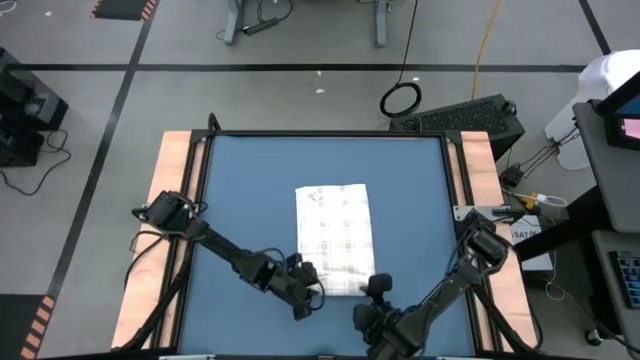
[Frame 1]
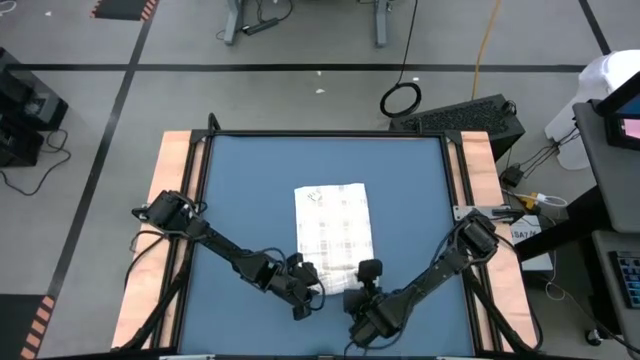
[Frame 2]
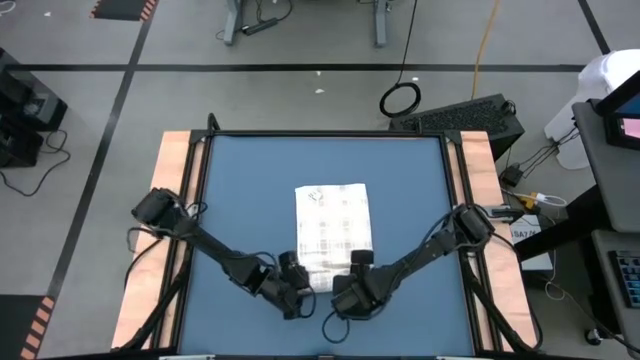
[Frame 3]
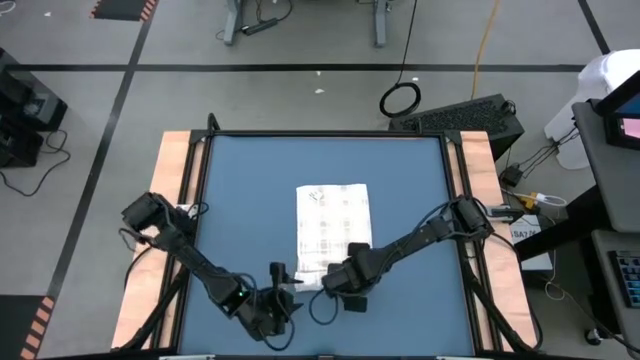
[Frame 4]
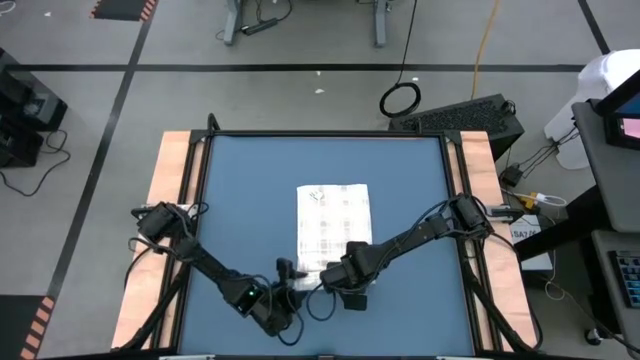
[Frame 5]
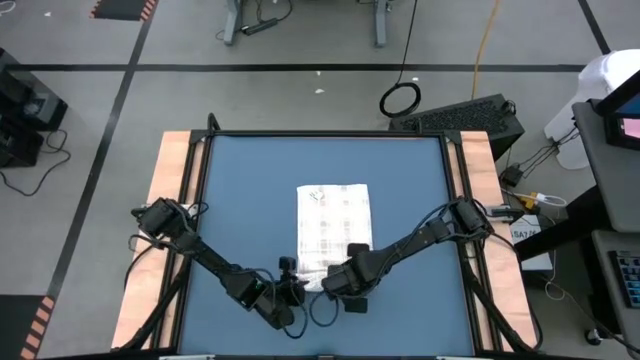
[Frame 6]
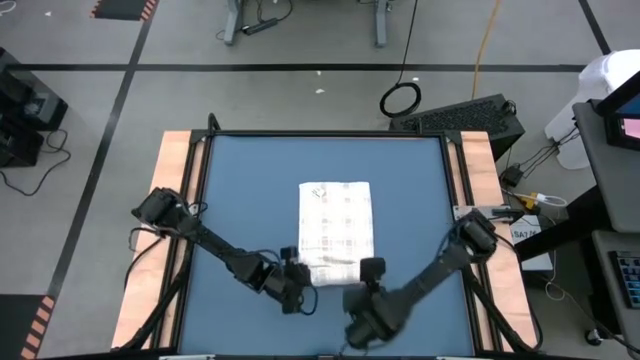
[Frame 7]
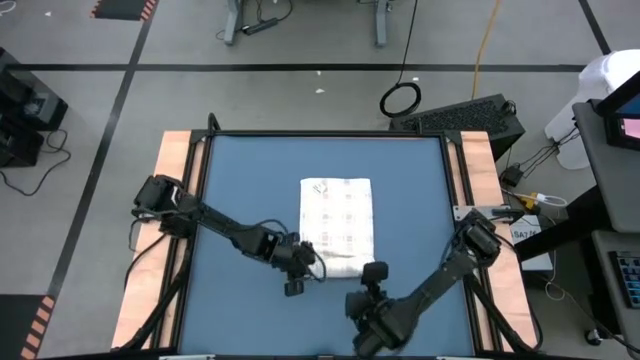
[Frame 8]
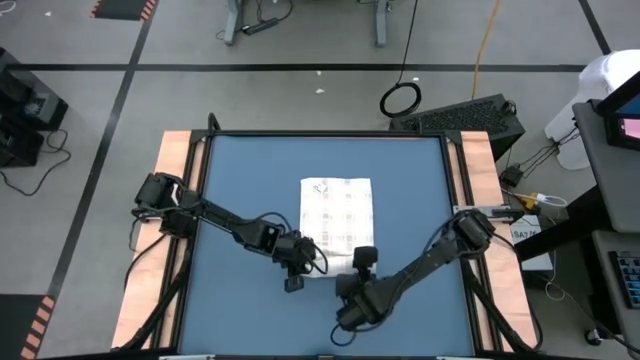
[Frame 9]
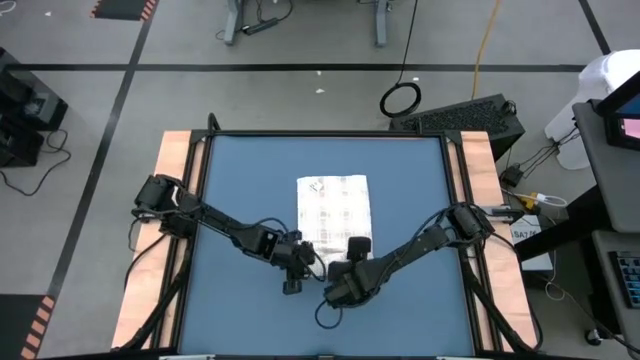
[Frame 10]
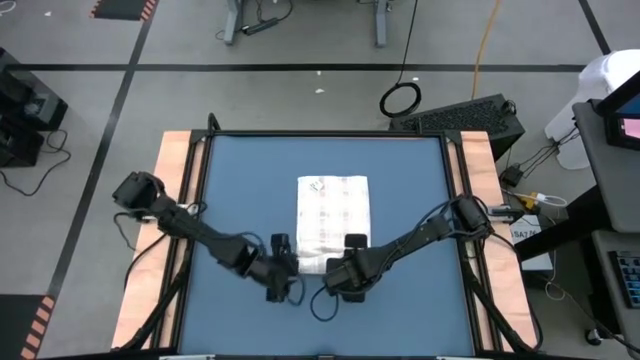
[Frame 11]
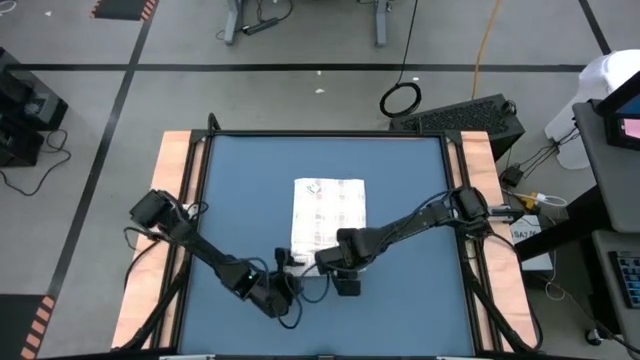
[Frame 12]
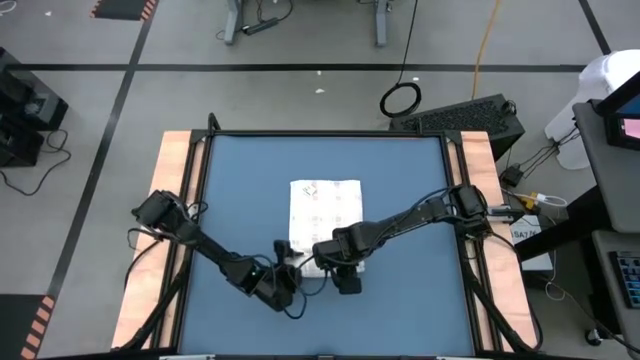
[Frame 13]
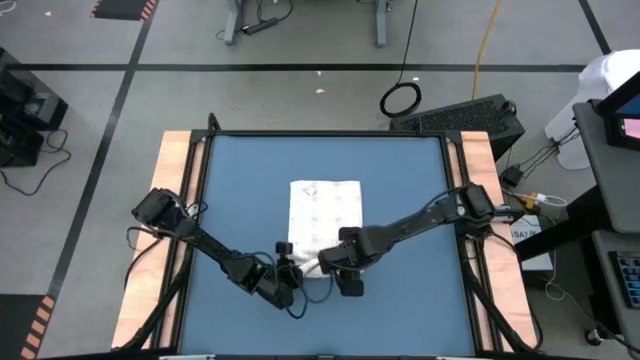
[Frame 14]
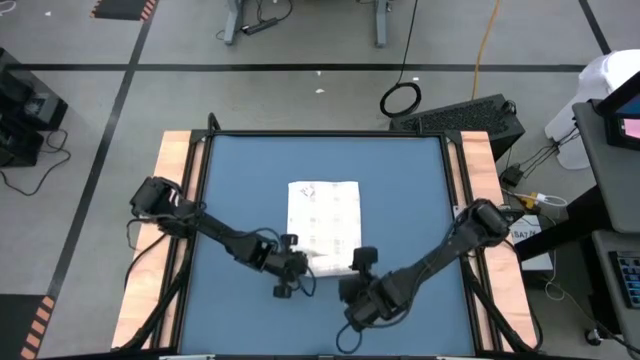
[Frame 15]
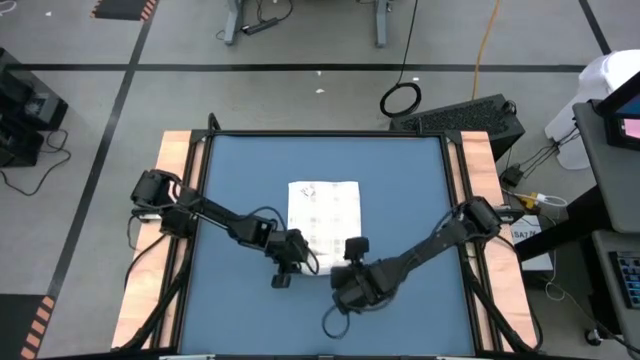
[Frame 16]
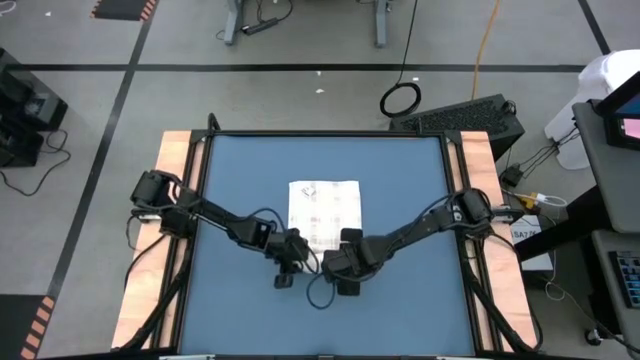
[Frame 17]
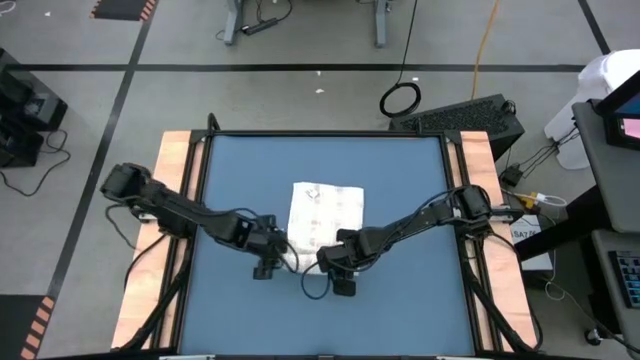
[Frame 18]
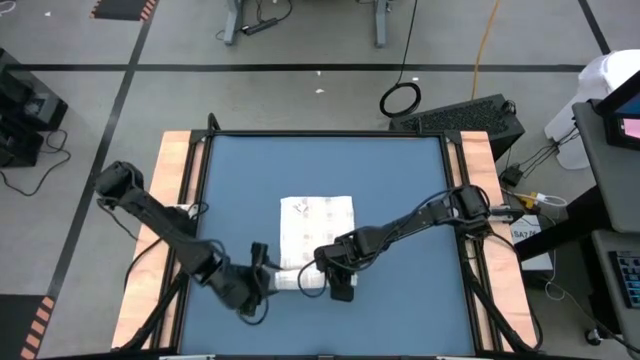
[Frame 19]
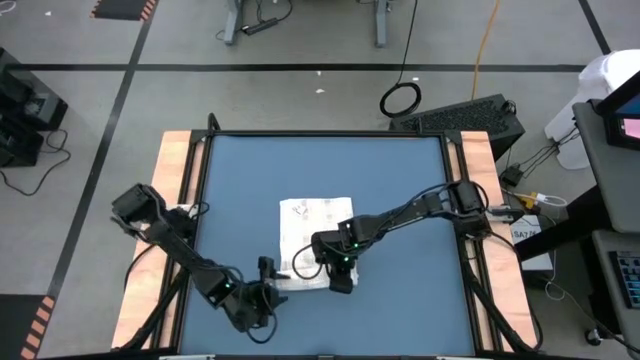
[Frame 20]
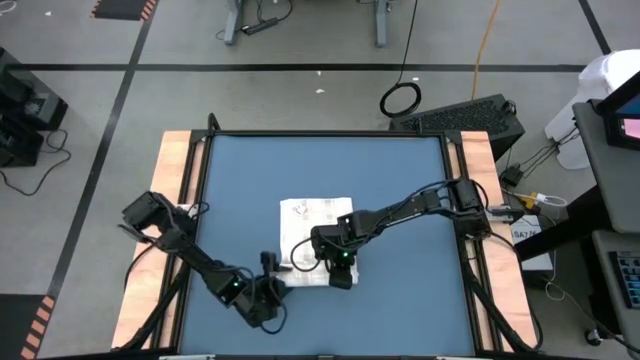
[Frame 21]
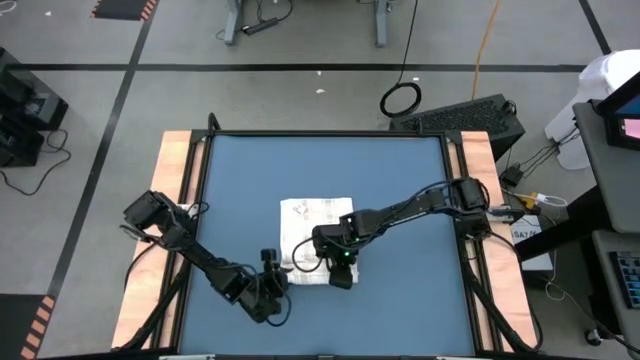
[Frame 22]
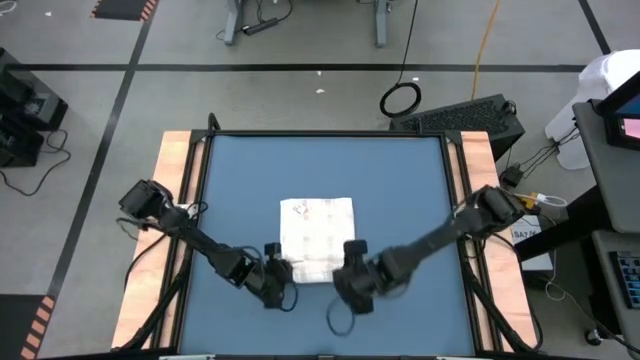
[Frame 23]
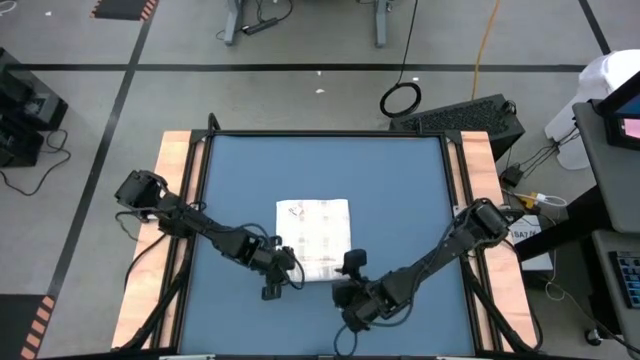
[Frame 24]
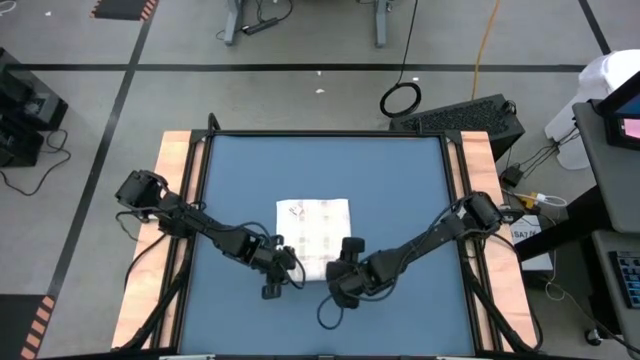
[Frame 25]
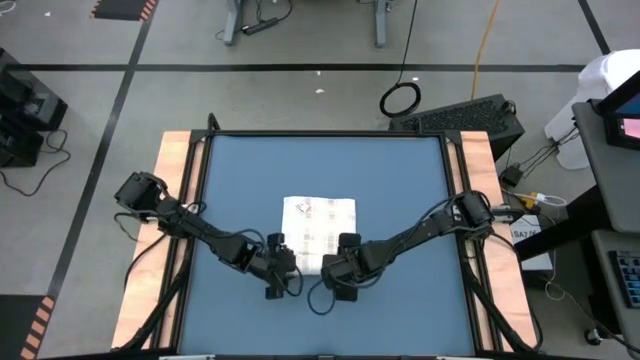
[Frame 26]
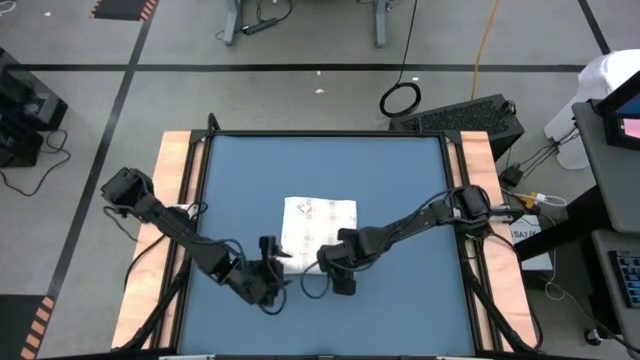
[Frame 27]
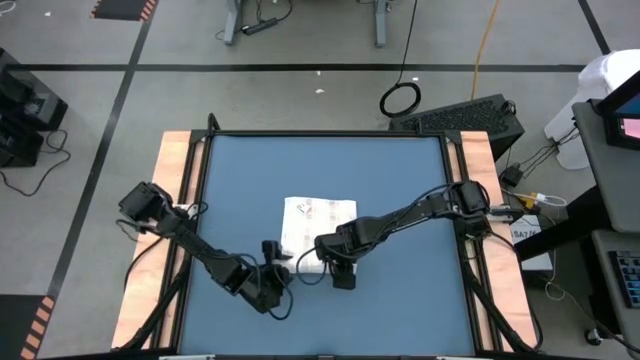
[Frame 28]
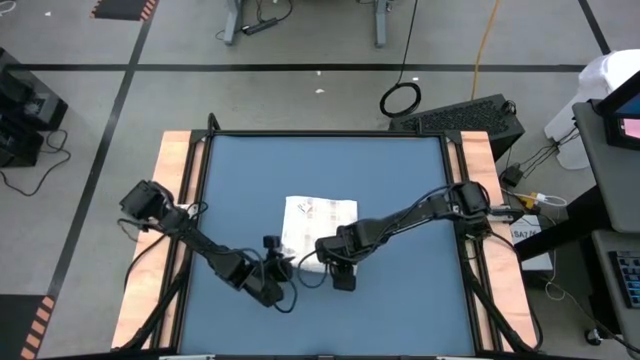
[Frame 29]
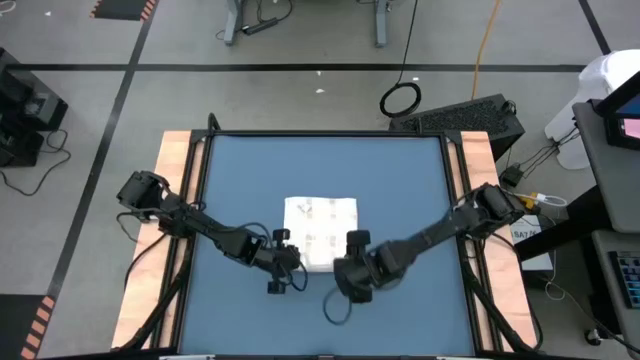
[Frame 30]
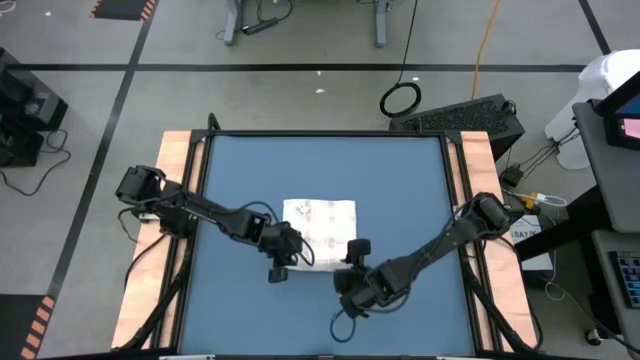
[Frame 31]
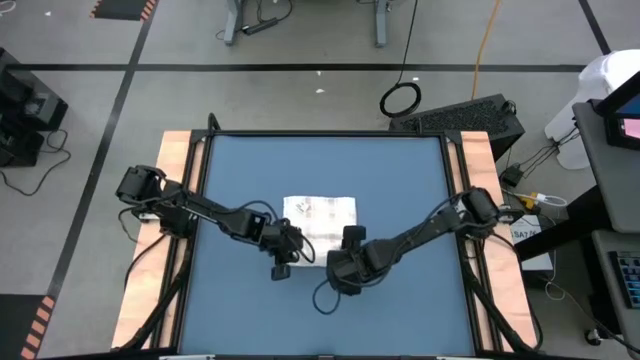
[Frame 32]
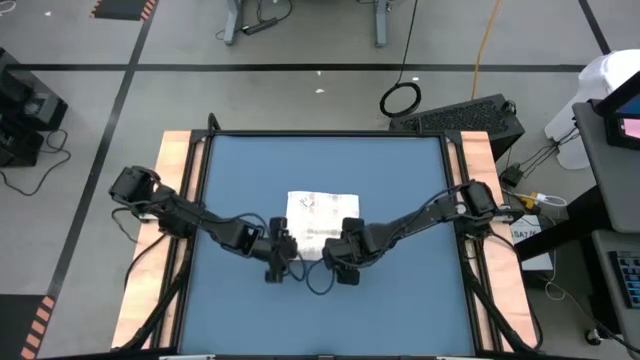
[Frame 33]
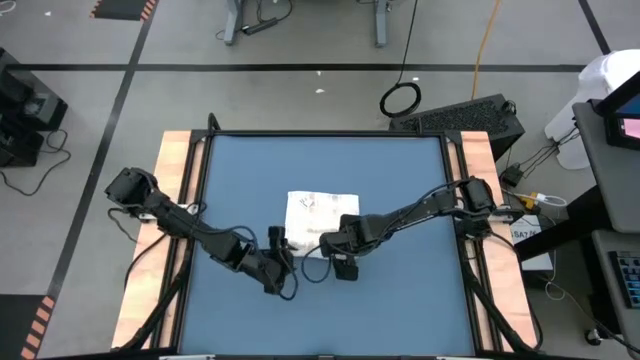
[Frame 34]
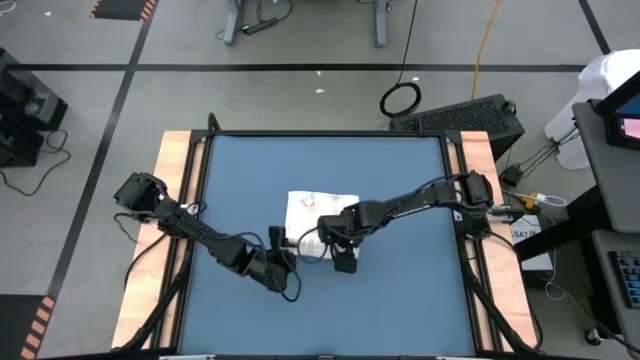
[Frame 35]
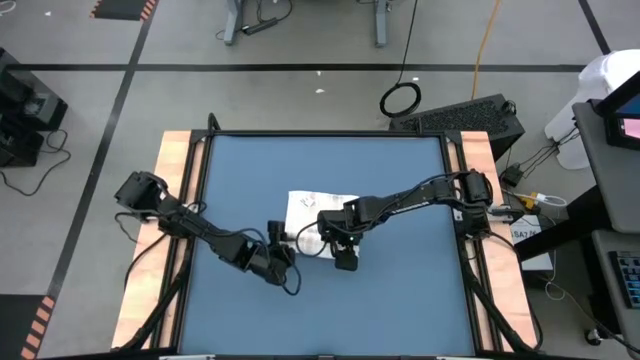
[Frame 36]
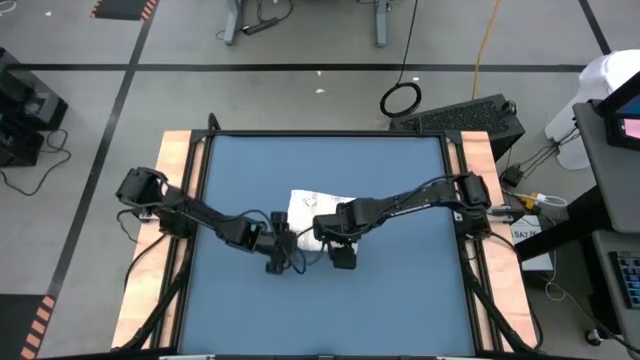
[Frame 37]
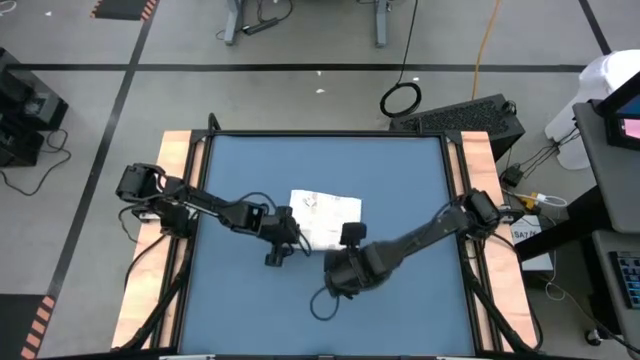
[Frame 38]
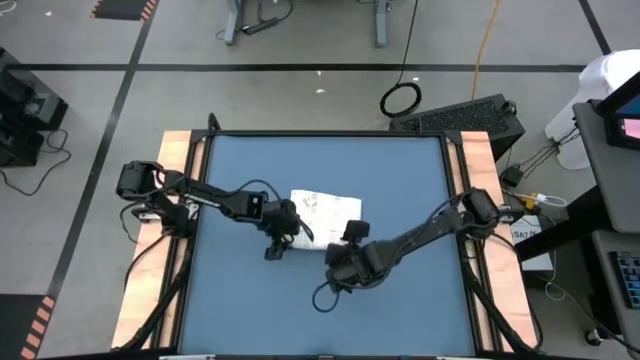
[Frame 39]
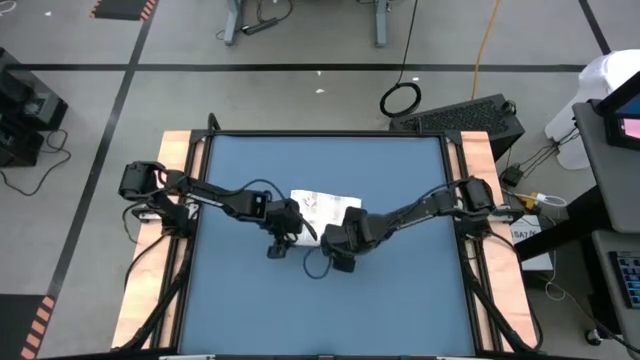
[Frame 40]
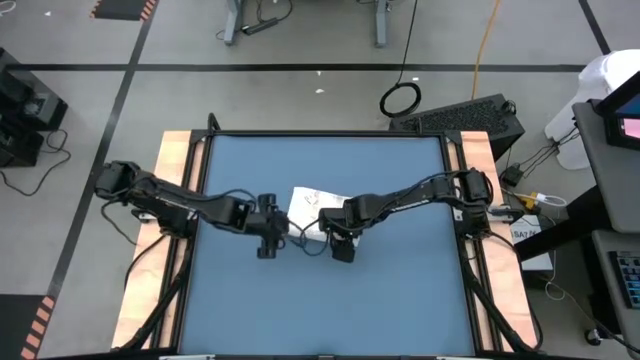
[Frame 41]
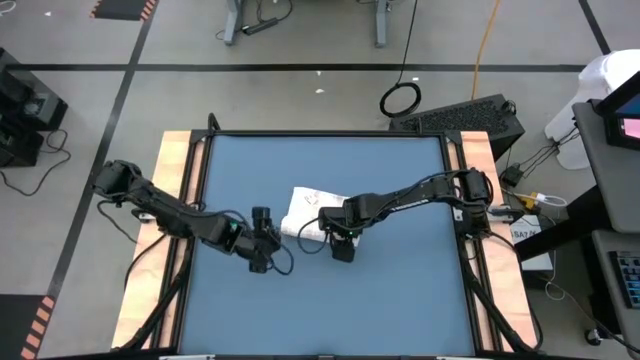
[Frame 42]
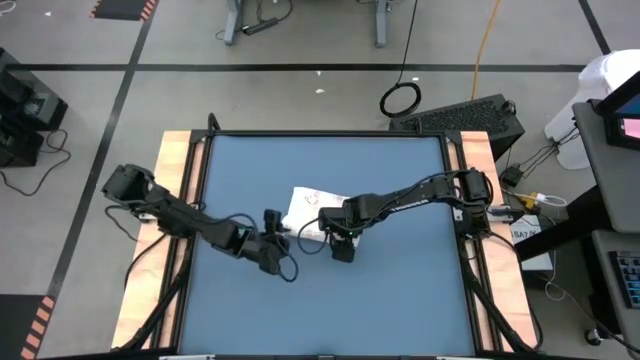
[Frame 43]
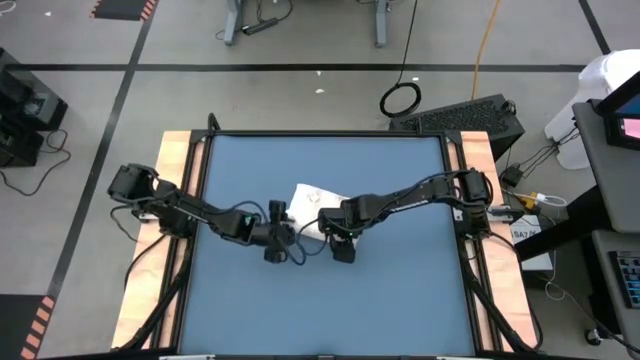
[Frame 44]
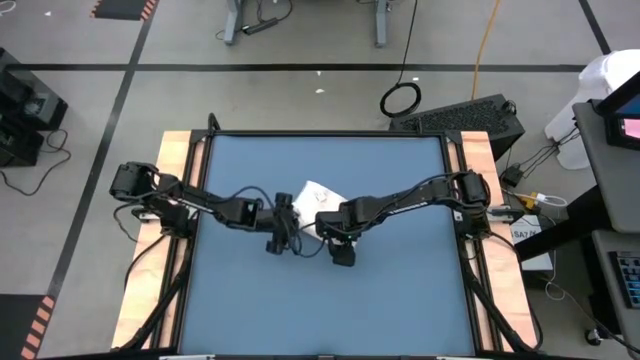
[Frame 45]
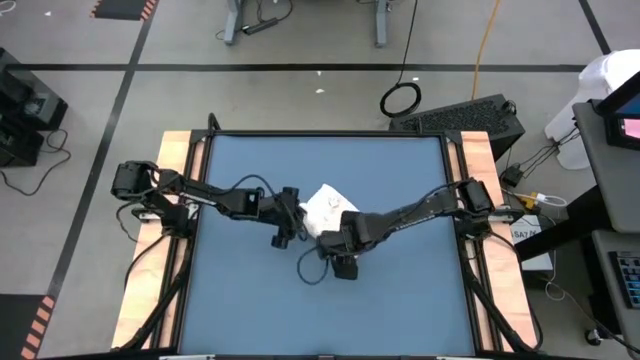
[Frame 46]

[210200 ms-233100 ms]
Task: Roll towel into tight, uniform cylinder
Roll the white towel
